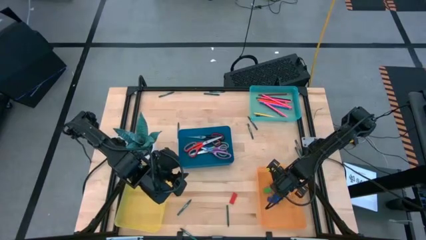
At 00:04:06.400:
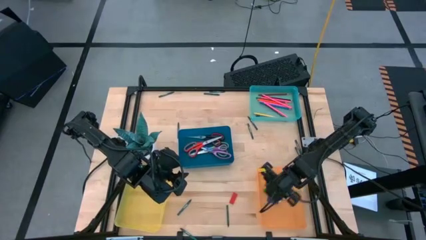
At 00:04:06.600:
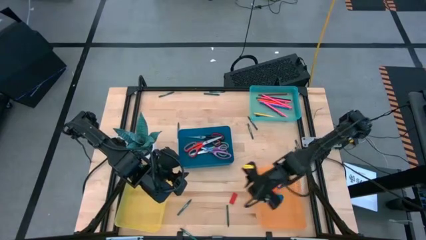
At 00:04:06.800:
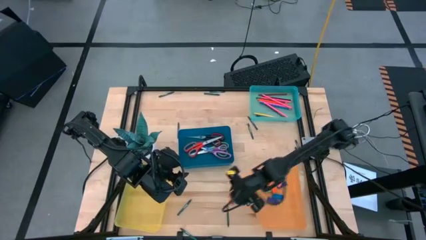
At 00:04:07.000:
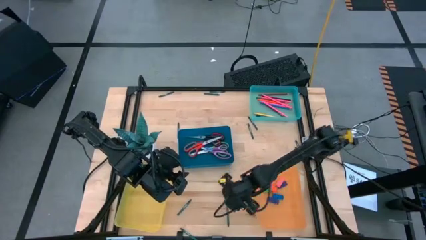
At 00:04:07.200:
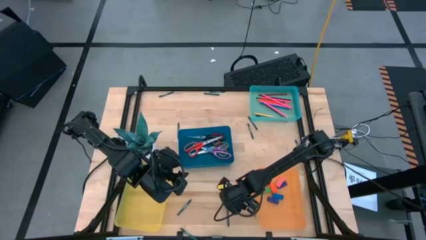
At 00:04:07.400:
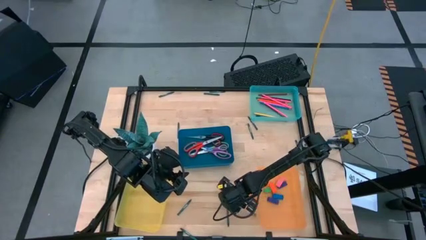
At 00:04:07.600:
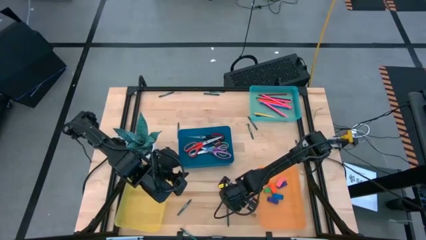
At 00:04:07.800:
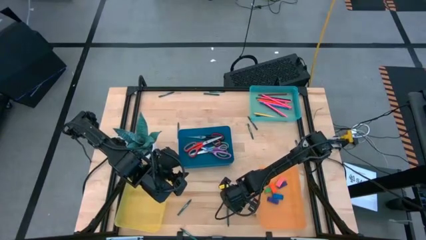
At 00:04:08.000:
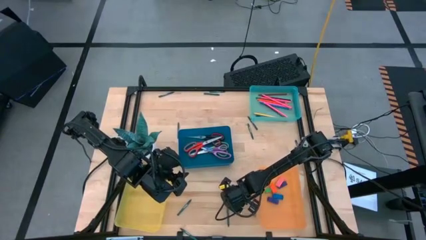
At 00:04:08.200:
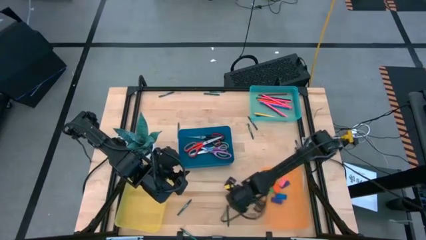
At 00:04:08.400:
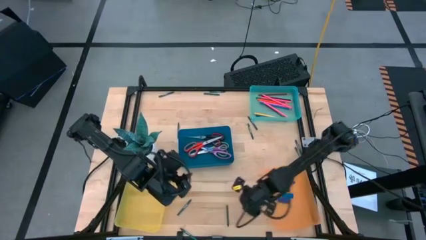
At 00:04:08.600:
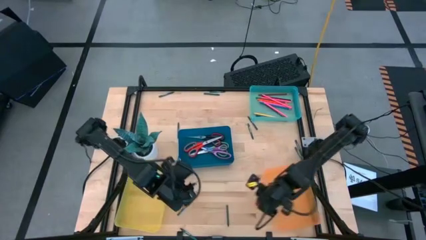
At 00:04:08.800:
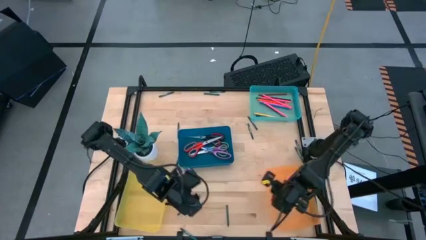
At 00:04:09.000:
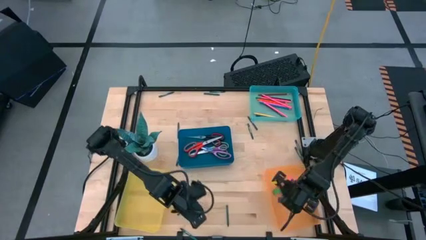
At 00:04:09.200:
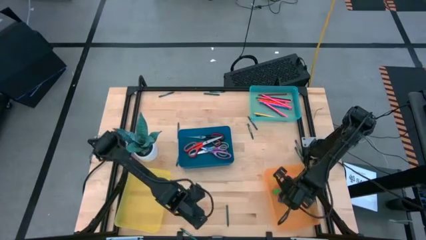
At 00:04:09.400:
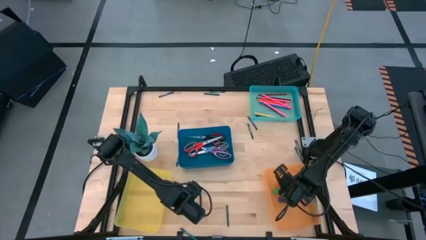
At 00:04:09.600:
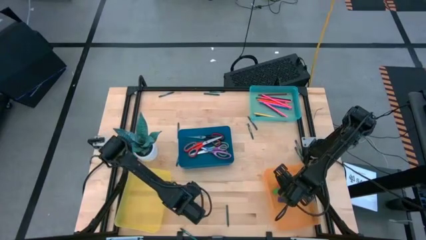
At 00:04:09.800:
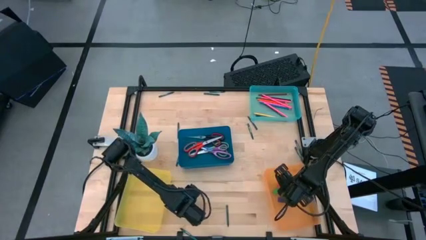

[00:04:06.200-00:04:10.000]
Task: Sort crayons/erasers/pens/pencils in bins
Put the red eraser into the orange bin

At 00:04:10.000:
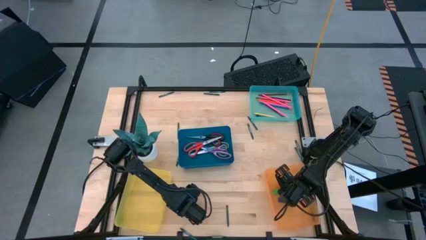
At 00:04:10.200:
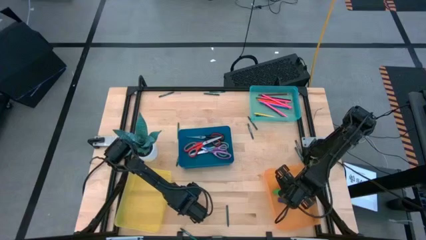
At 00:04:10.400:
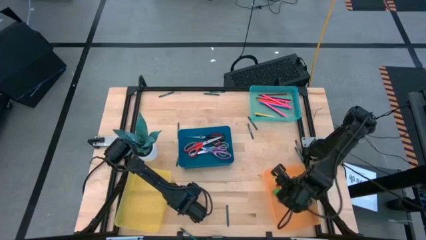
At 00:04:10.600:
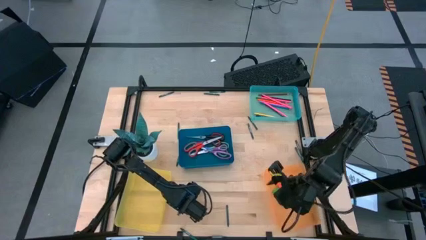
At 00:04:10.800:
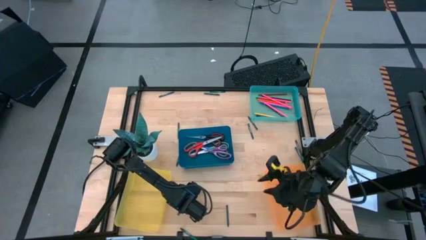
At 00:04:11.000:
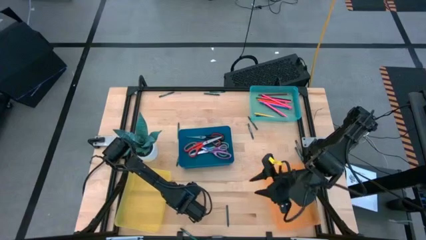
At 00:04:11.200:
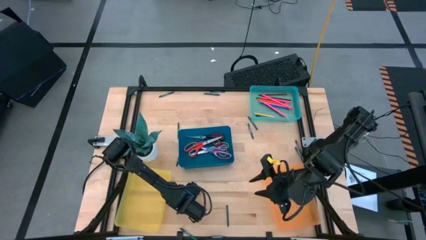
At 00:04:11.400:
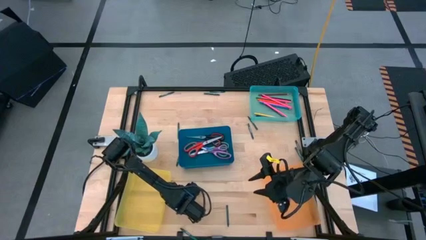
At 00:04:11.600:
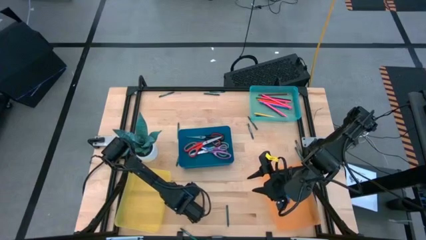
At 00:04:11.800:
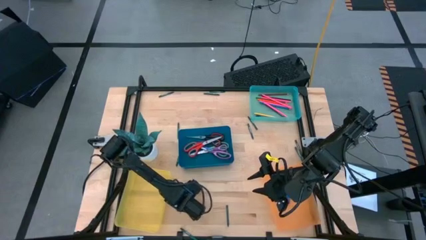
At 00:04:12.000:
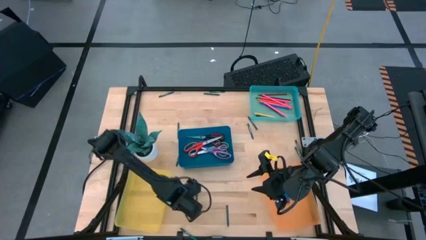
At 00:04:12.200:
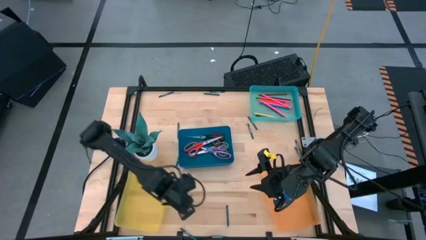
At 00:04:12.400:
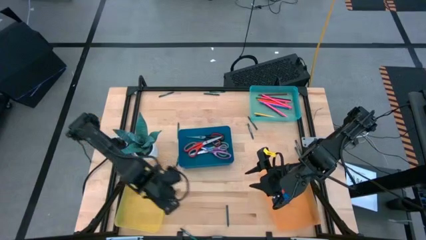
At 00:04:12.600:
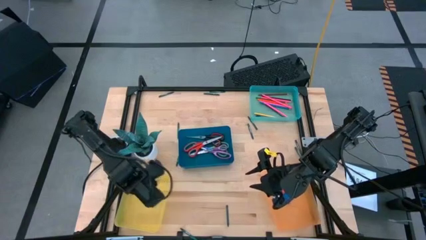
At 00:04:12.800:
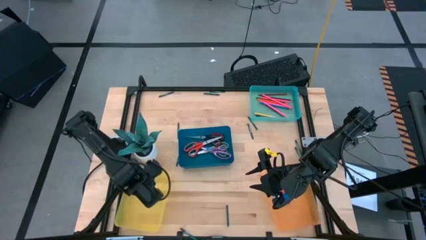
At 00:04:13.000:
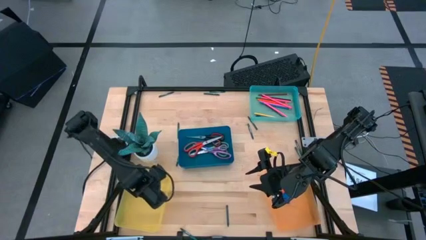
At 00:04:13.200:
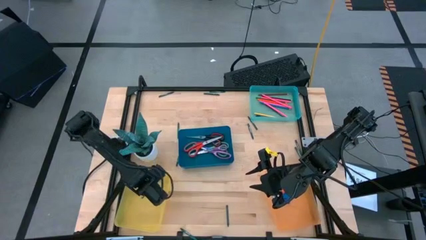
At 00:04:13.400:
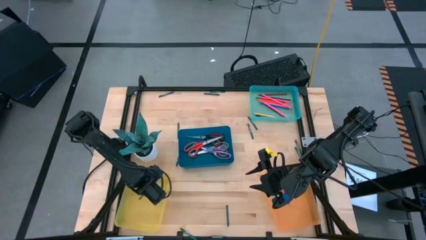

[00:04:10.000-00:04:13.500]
Put the green crayon into the yellow bin

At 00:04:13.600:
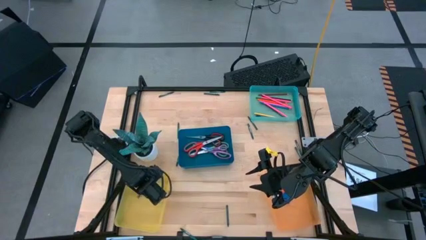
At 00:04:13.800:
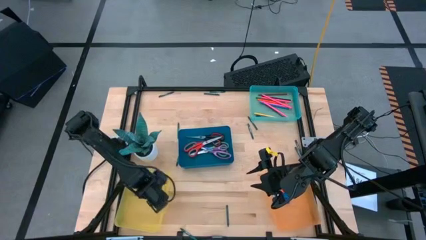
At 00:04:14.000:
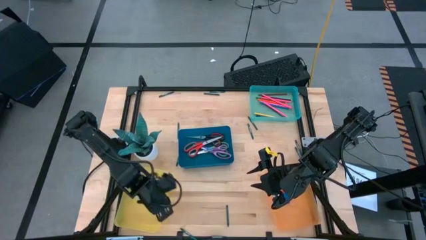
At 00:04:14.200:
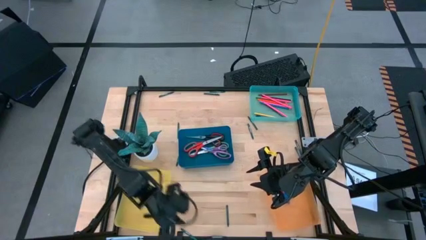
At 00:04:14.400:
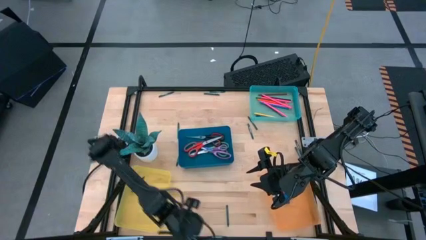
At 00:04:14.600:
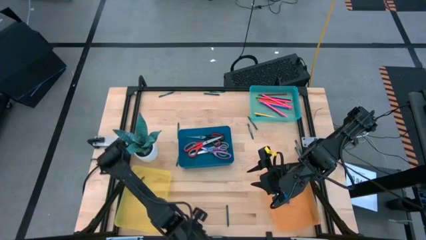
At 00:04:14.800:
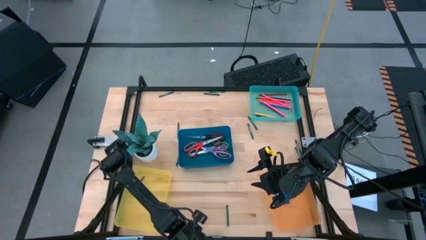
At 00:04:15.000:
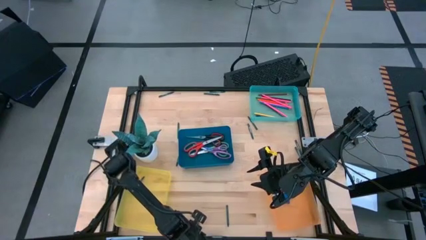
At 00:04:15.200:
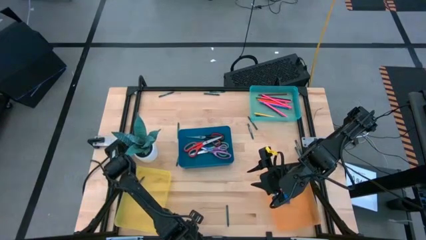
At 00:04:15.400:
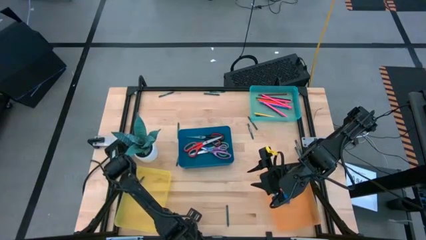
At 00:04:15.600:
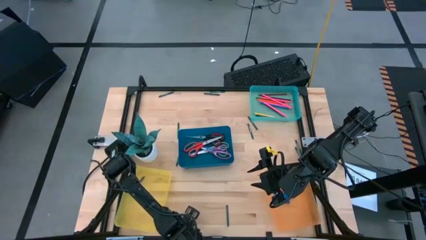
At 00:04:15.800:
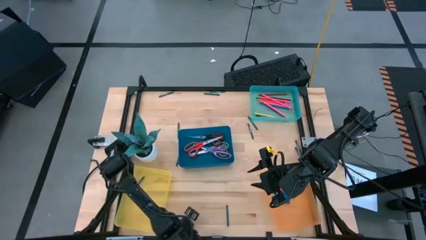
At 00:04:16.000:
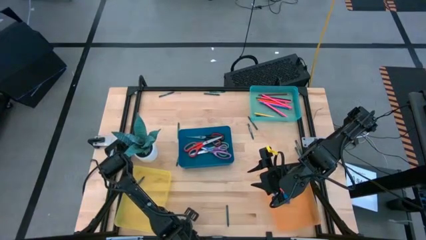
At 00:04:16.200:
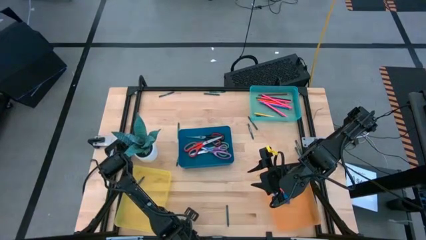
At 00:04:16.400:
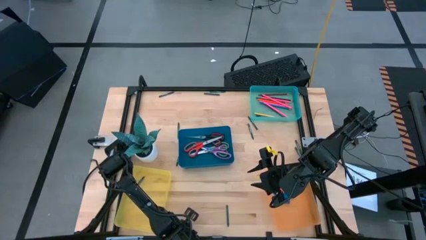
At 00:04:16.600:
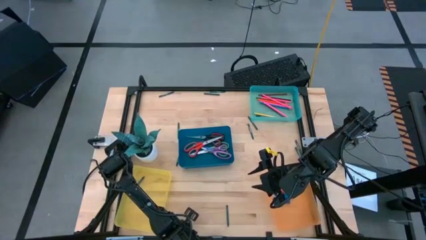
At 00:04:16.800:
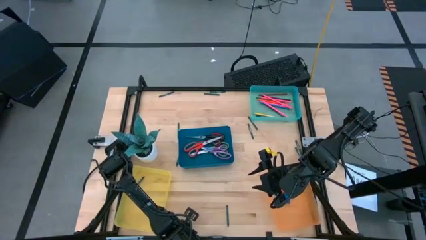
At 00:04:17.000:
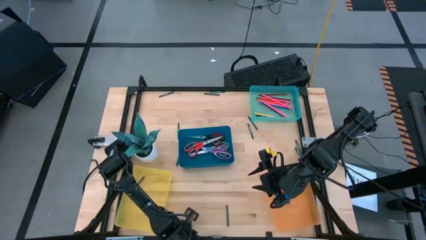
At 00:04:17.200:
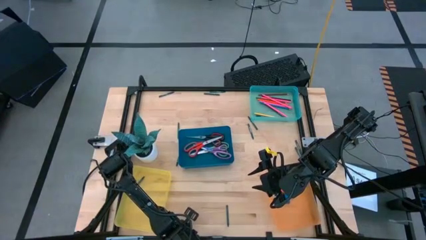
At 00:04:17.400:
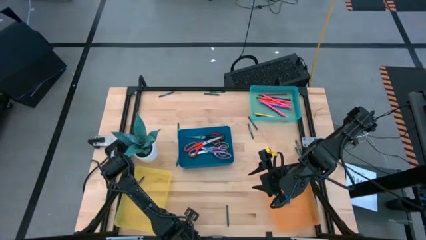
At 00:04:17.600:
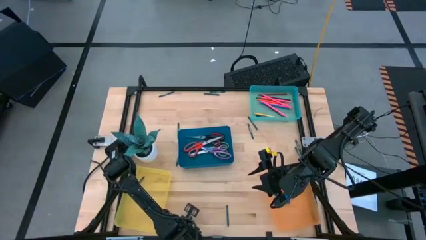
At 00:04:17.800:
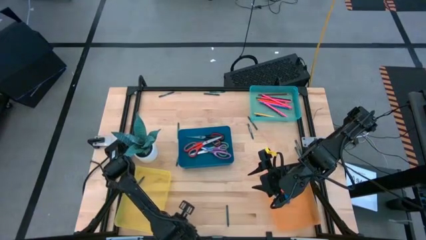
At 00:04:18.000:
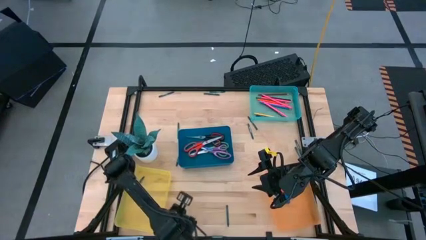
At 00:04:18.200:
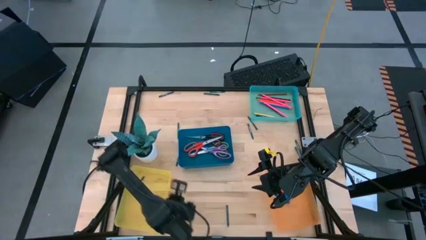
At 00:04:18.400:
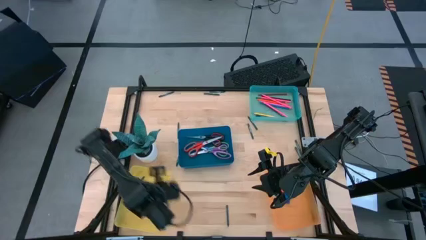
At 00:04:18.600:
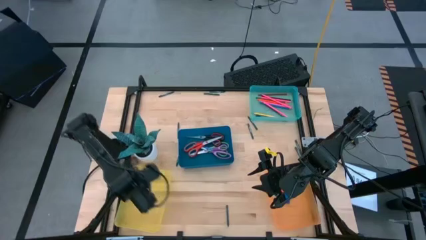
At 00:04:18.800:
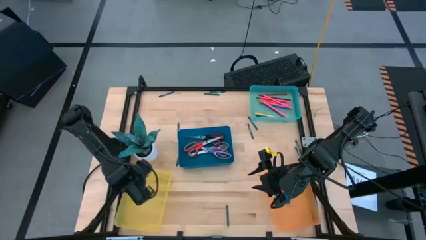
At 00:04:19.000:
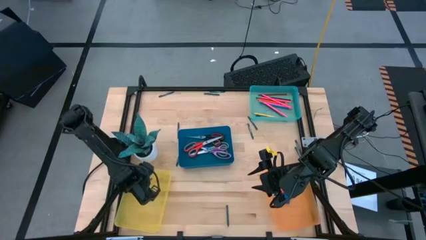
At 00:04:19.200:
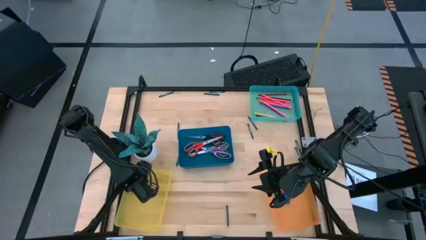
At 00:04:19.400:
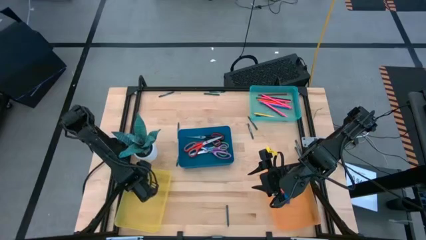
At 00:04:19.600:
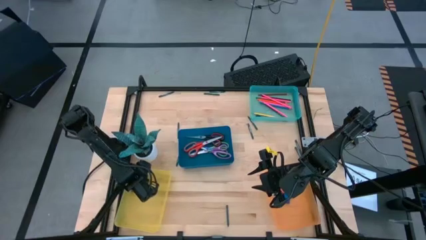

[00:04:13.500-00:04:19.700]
Put the green crayon into the yellow bin

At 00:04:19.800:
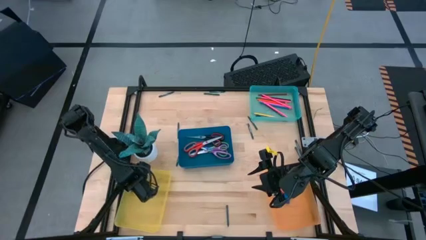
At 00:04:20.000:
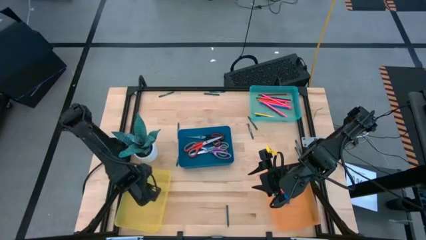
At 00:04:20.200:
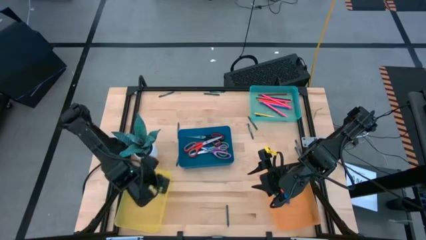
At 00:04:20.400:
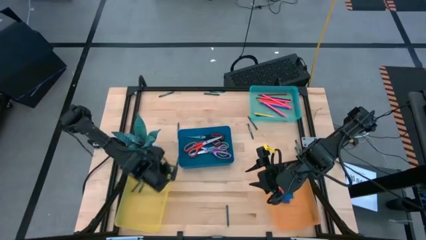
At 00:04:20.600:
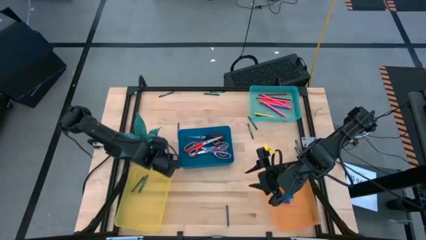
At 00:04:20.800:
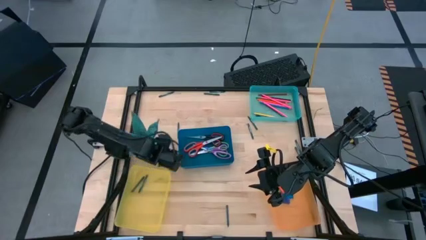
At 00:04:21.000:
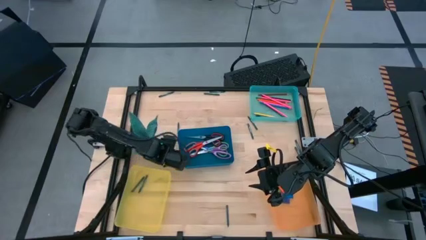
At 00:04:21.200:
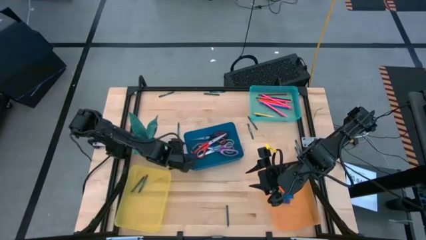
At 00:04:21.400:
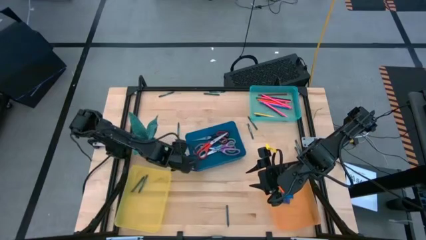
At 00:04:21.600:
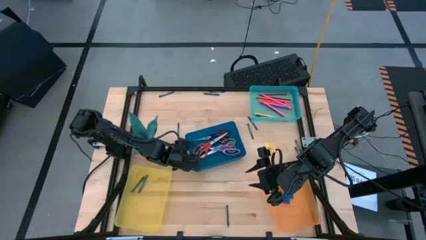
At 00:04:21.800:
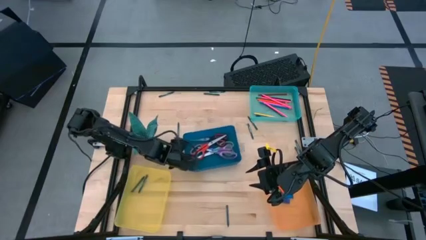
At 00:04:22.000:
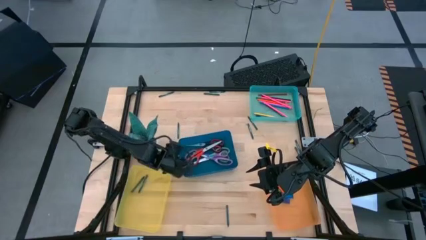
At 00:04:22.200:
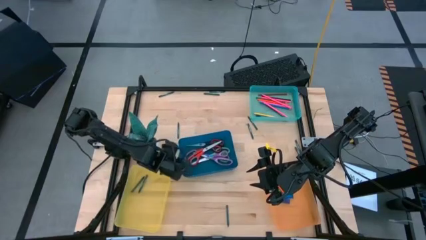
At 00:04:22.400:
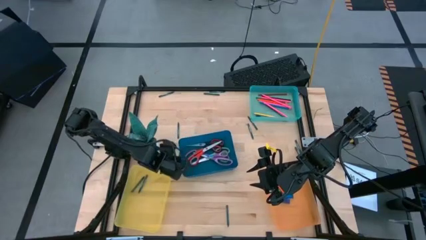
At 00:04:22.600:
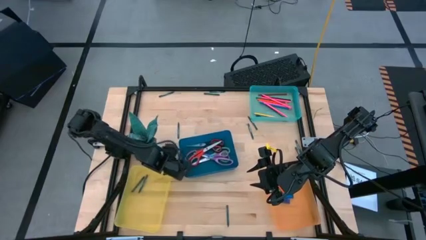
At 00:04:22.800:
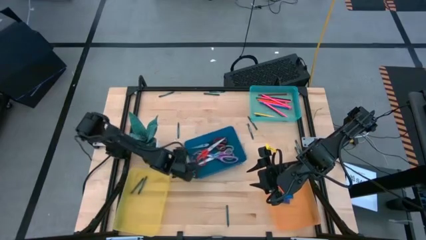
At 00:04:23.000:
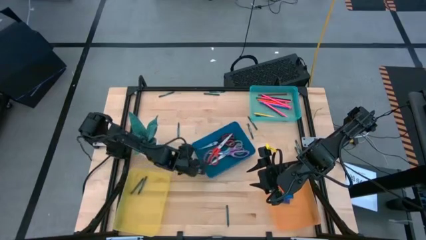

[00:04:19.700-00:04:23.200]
Adjust the blue bin
